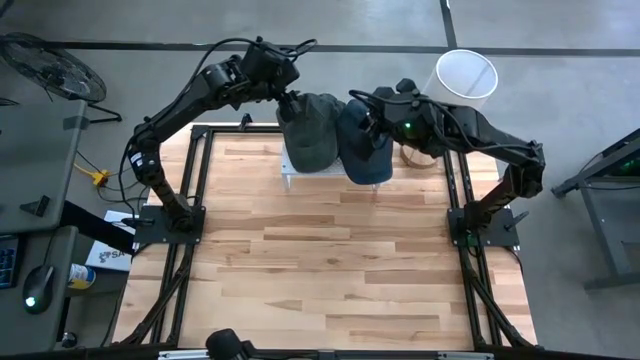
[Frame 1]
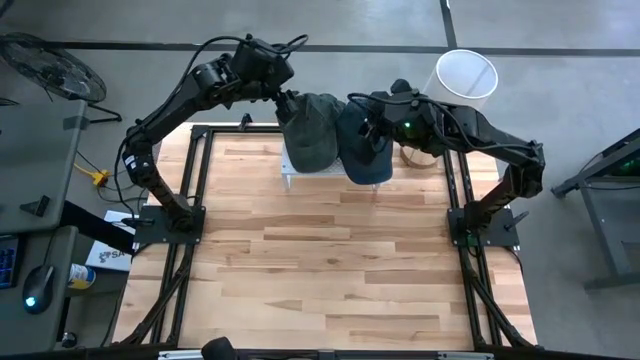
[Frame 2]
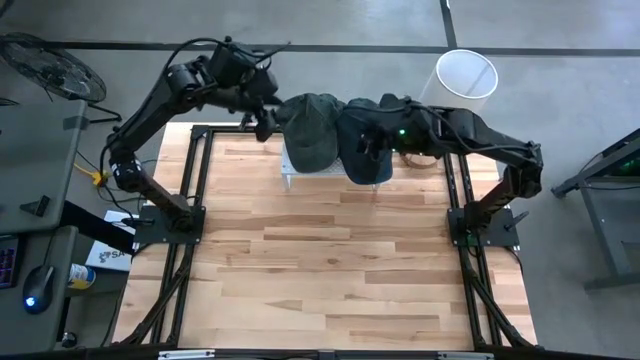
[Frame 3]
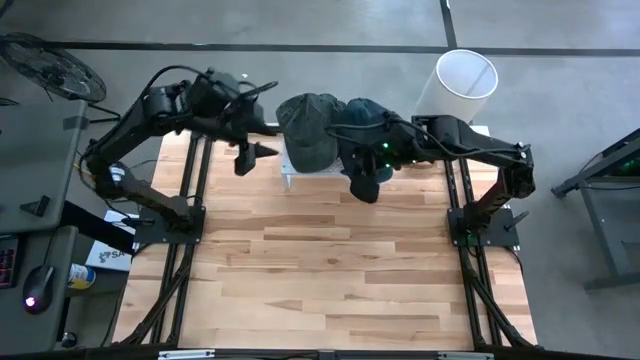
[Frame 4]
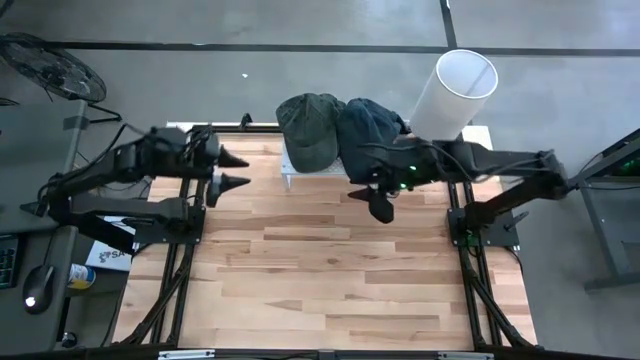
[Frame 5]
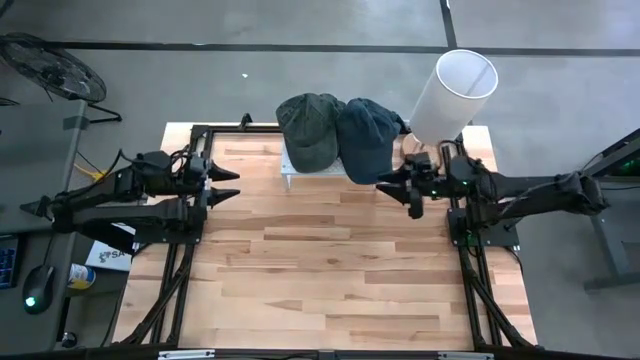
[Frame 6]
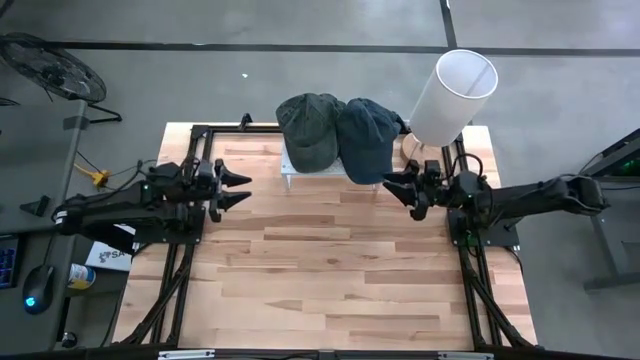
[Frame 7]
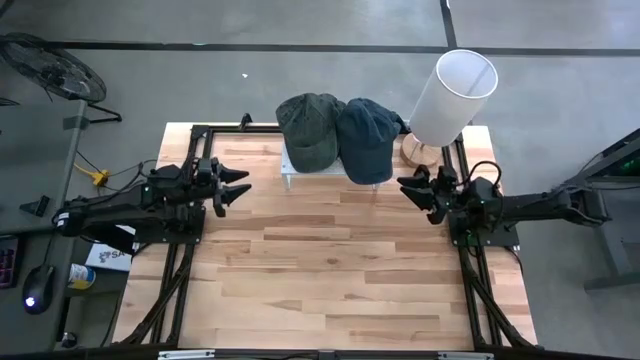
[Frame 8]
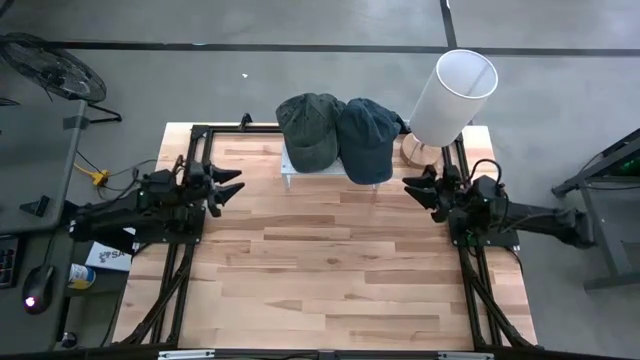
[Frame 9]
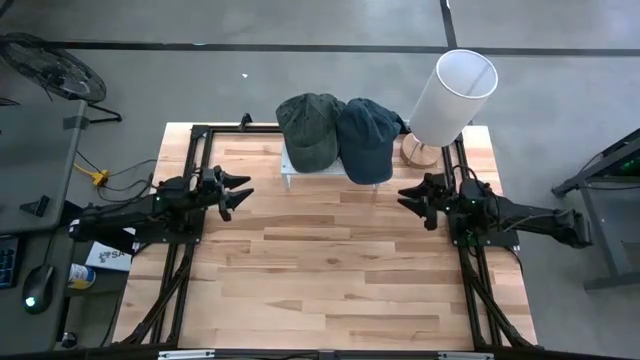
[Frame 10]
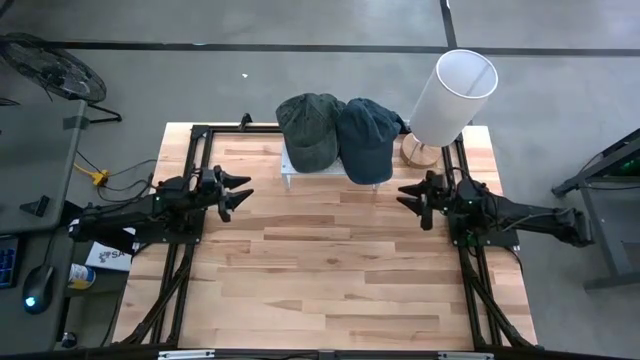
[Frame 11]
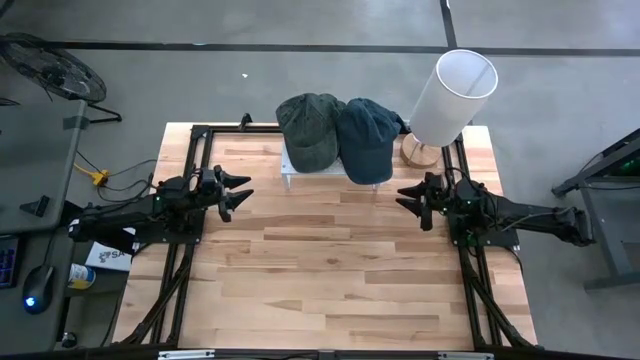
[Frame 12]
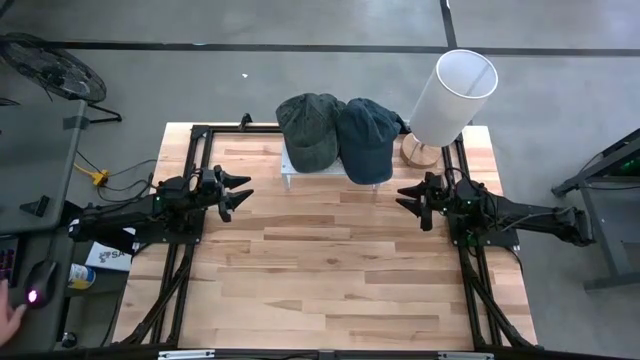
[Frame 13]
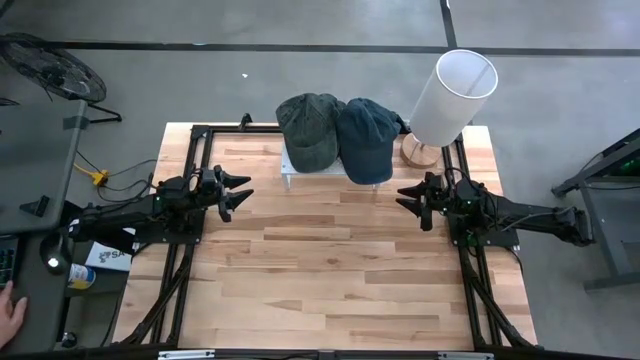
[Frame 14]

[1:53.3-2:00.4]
Task: Pick & Place hat
Return to Home Position

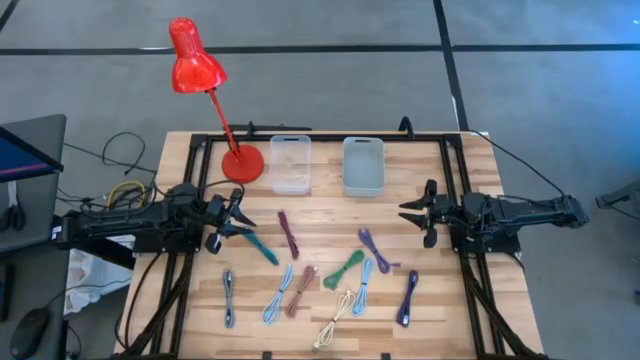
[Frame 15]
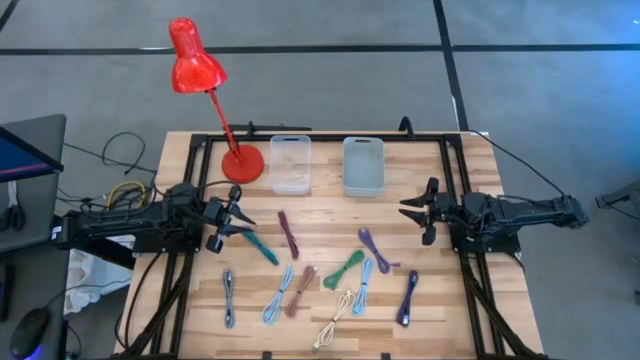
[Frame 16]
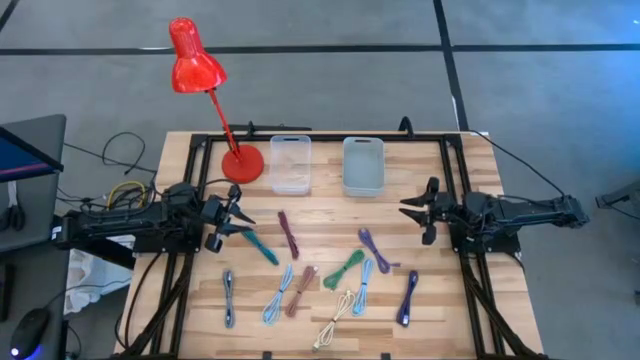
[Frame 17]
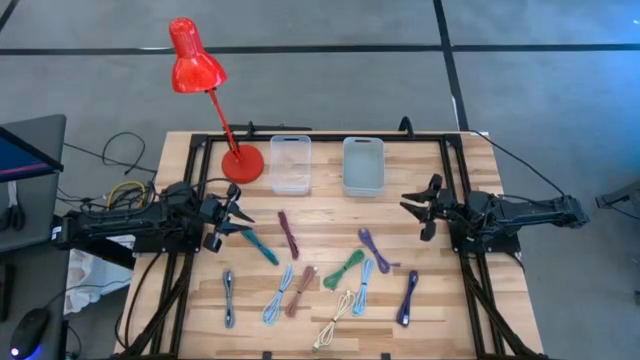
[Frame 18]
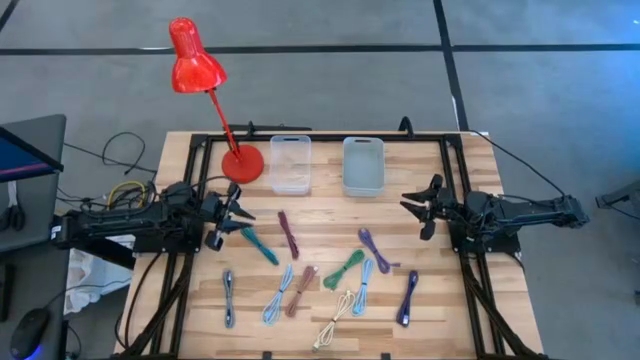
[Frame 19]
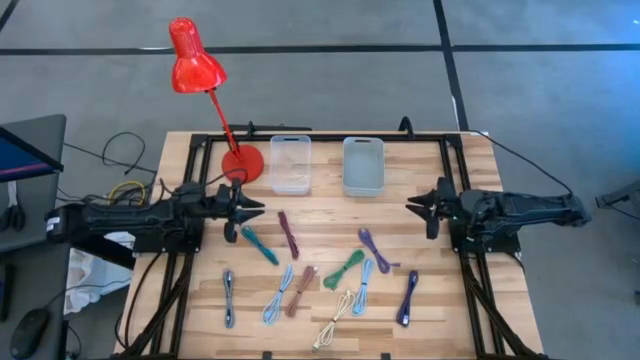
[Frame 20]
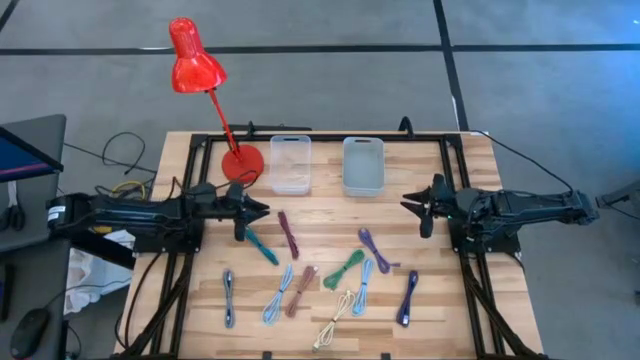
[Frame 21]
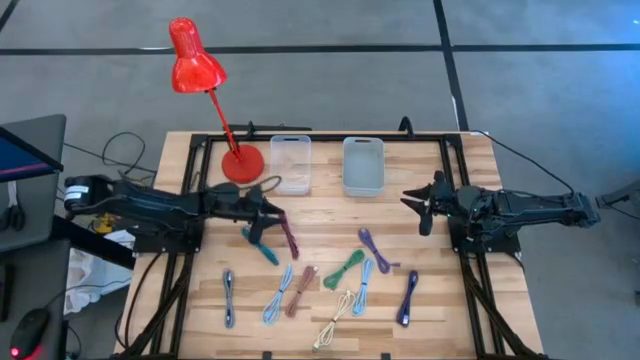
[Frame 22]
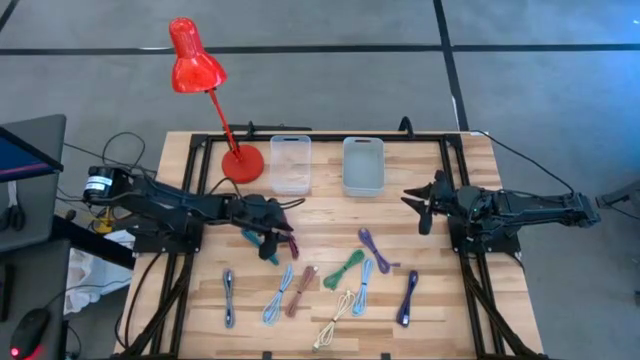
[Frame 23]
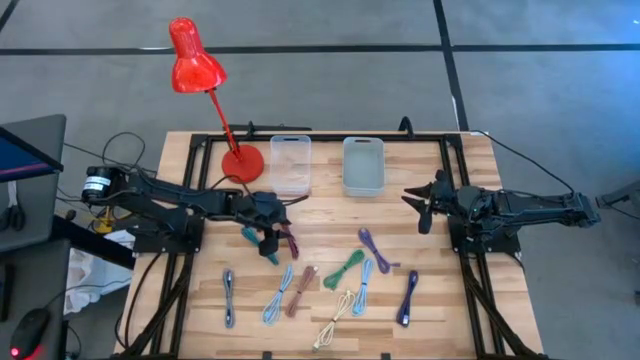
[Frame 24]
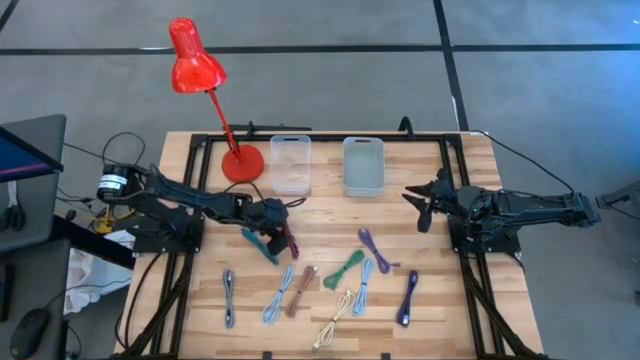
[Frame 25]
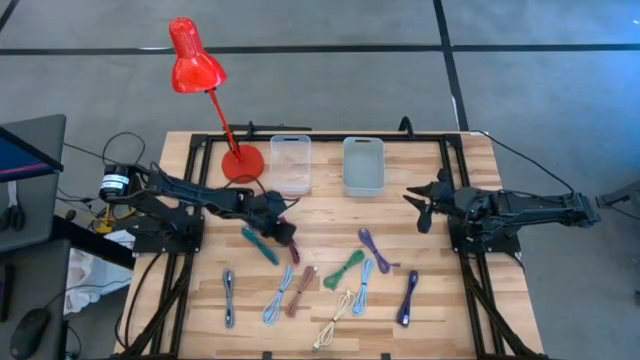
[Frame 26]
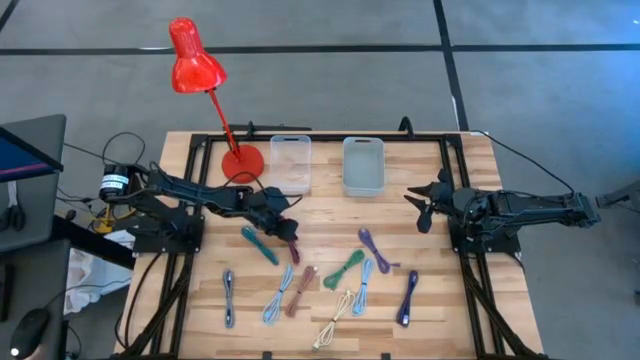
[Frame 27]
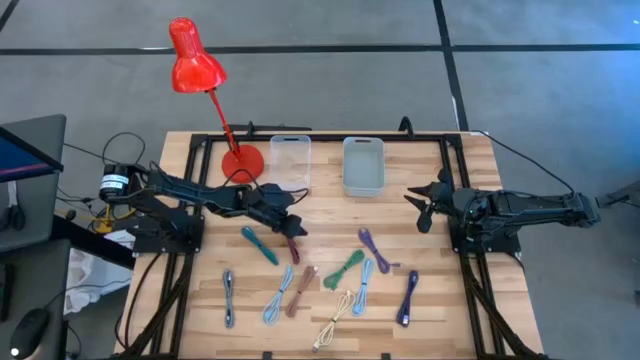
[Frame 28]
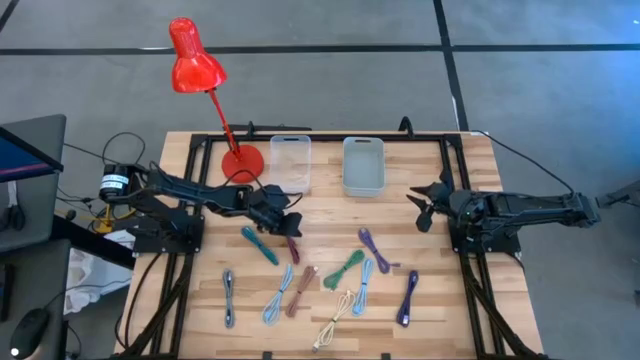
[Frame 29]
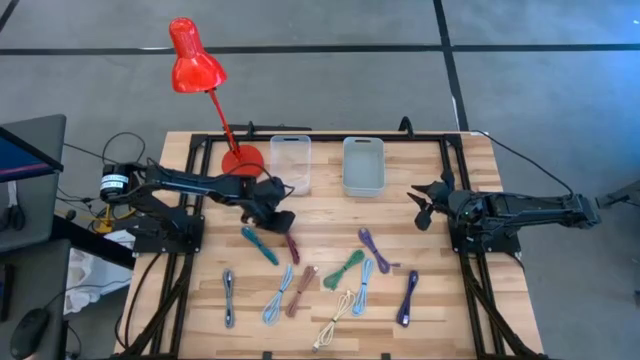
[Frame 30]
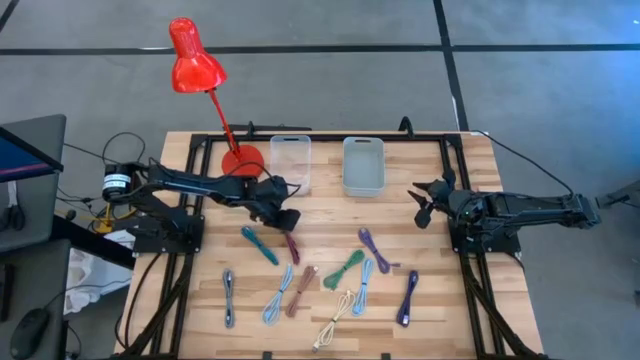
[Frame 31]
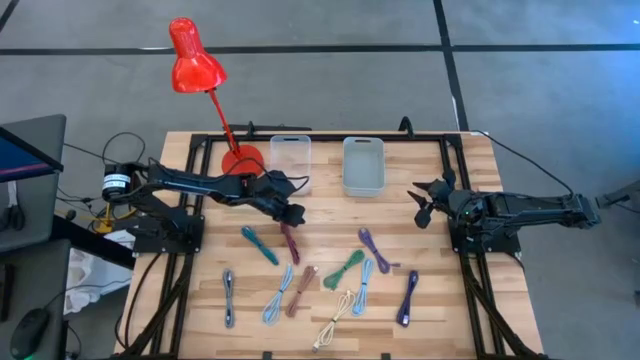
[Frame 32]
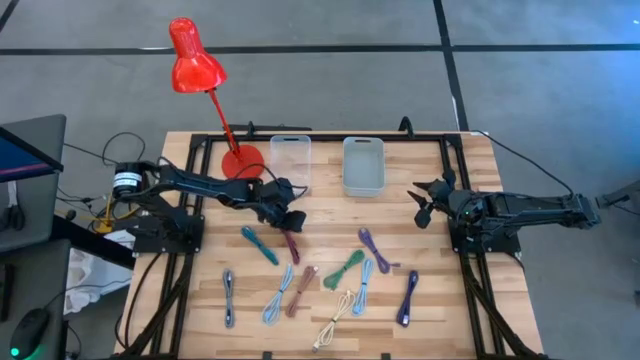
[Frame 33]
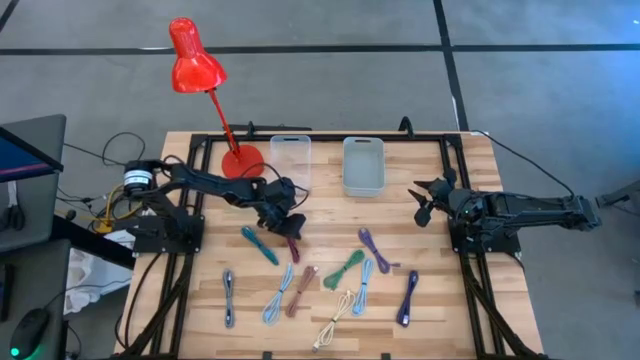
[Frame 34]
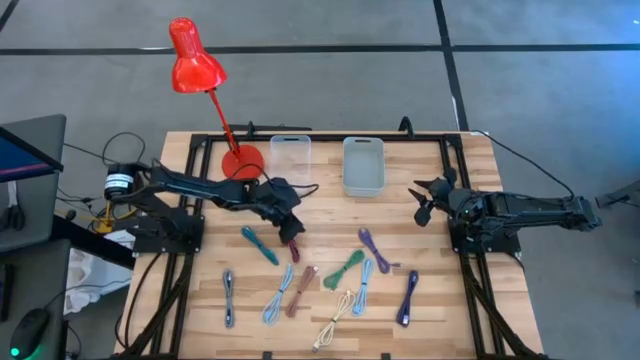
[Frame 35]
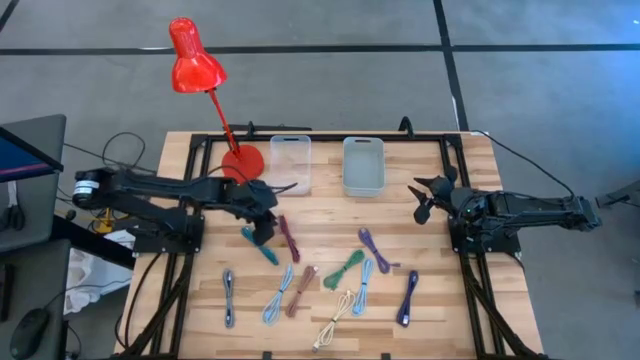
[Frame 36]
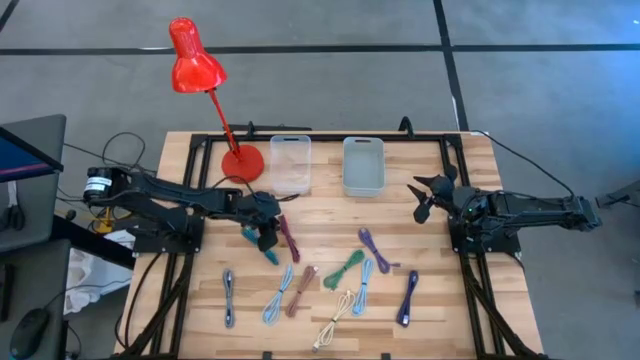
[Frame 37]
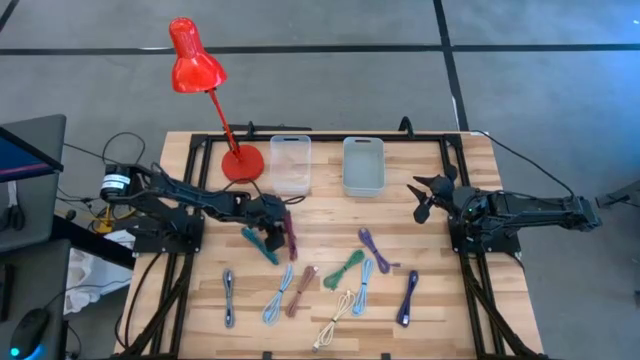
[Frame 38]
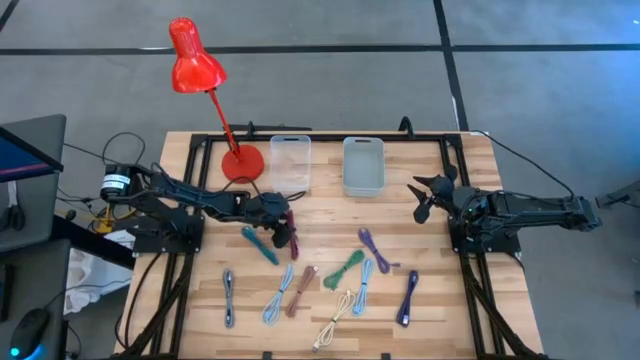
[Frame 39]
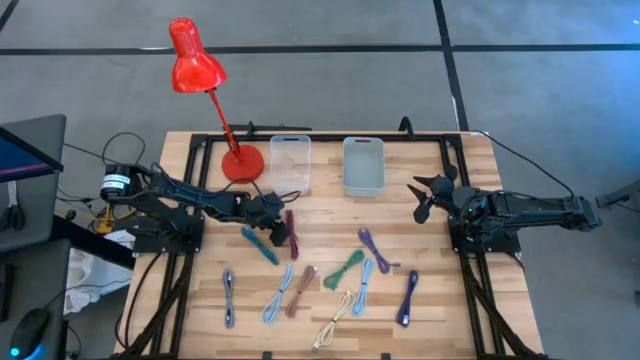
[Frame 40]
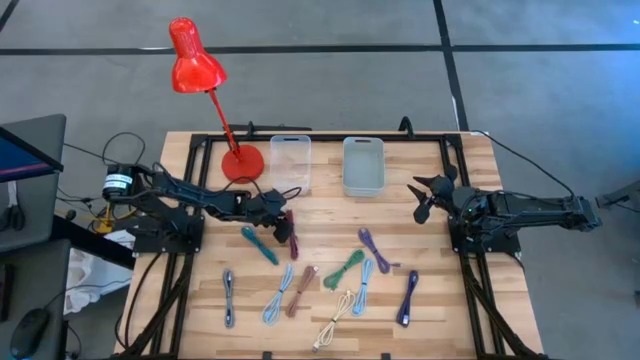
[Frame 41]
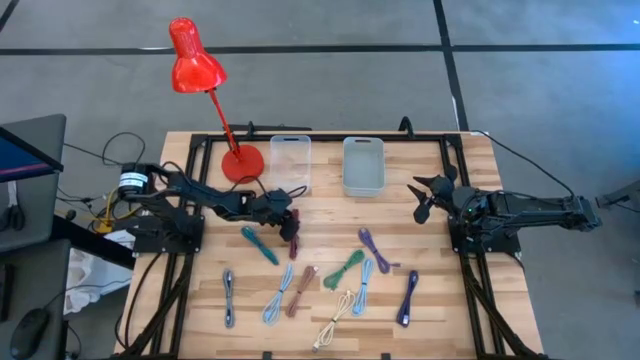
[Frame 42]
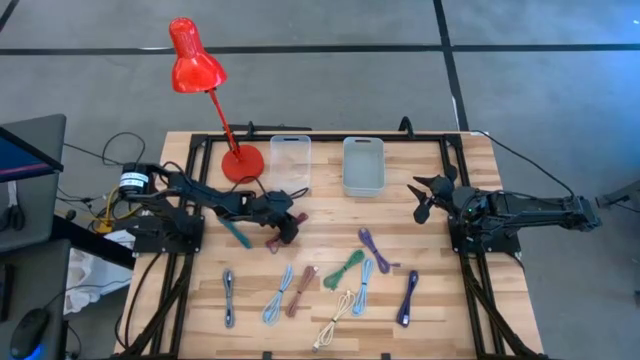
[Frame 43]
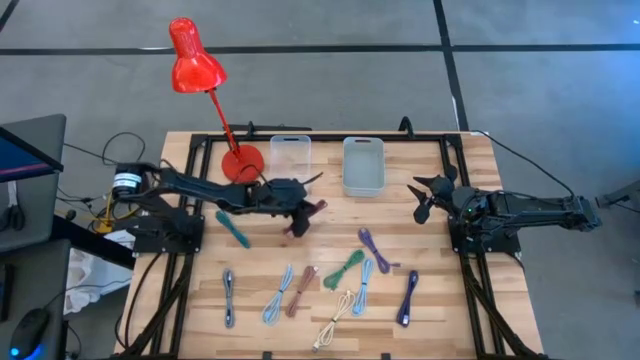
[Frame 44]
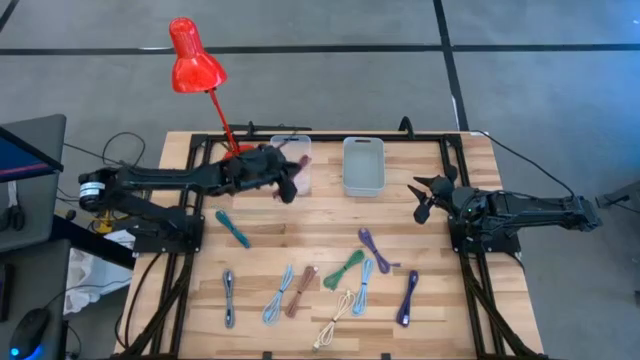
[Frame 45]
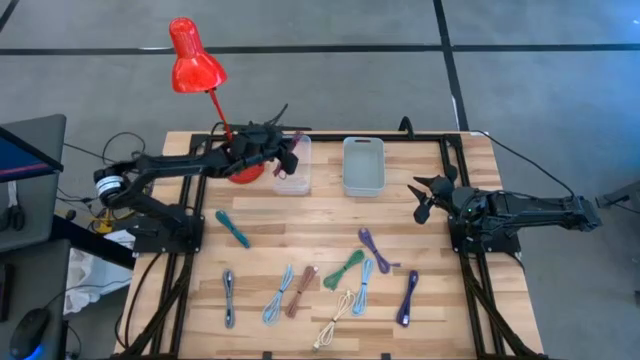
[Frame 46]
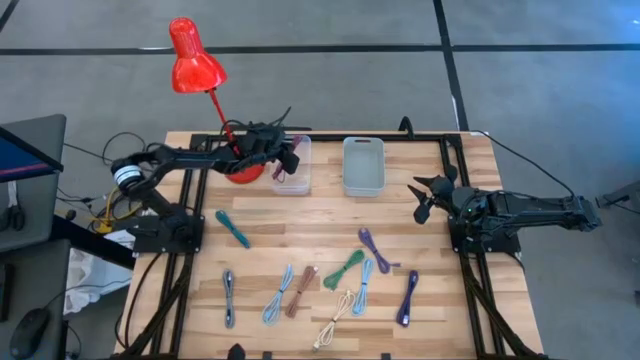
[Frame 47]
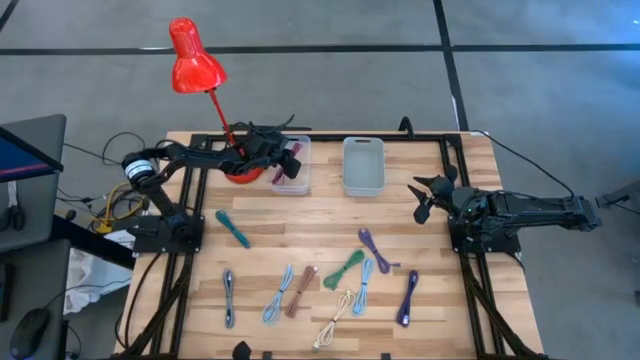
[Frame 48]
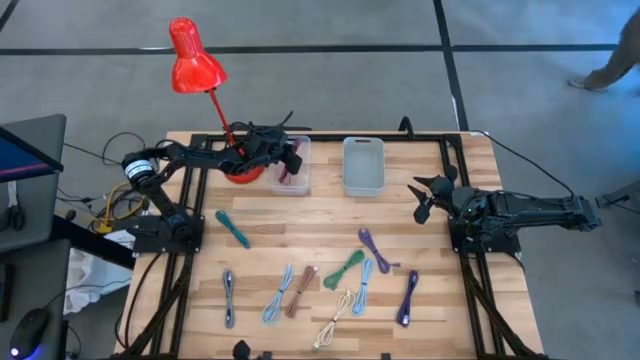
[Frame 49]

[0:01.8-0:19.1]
Task: Pick & Place USB Port
Put the pink patterned USB cable into the transparent bin
